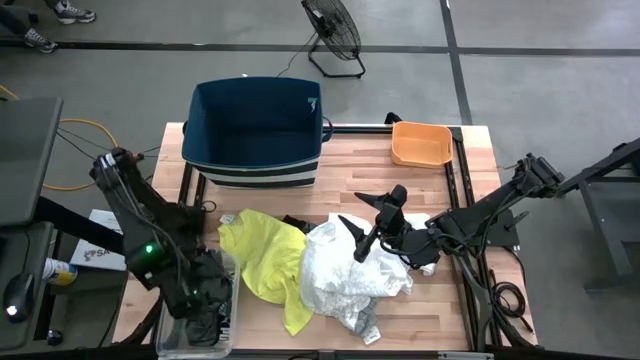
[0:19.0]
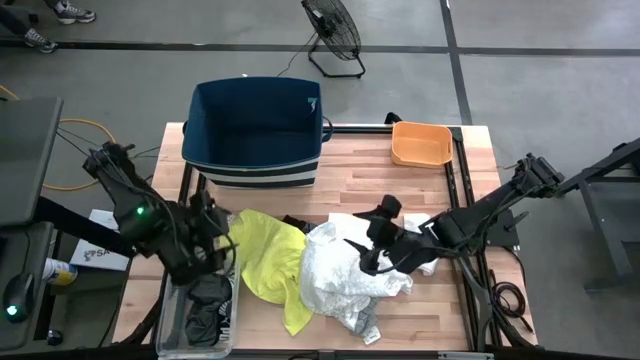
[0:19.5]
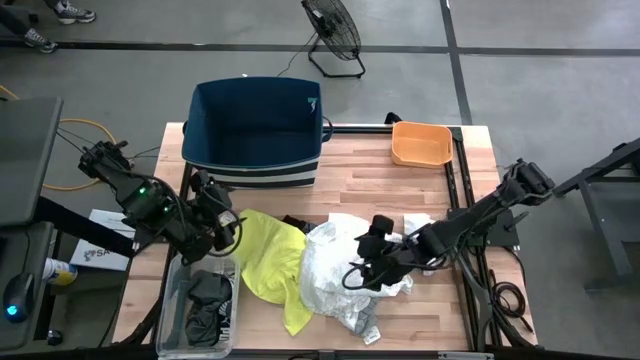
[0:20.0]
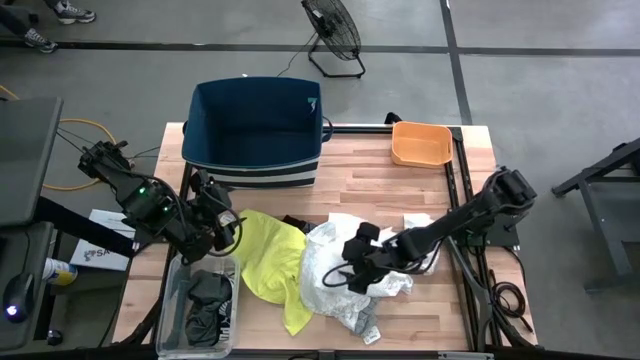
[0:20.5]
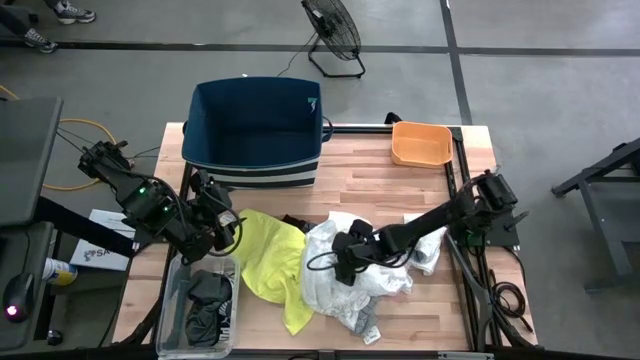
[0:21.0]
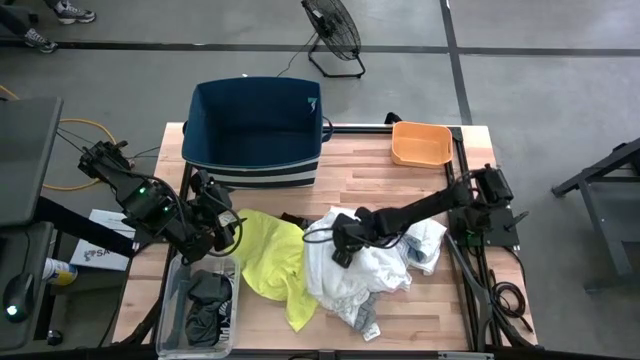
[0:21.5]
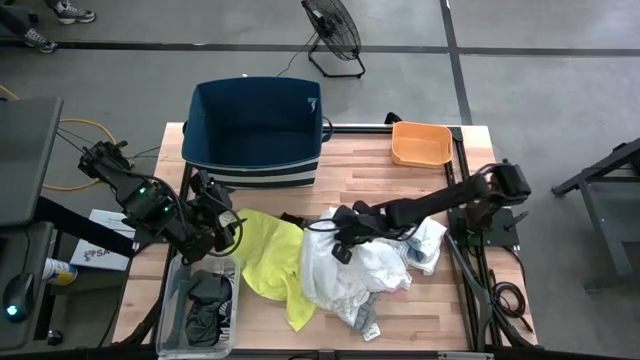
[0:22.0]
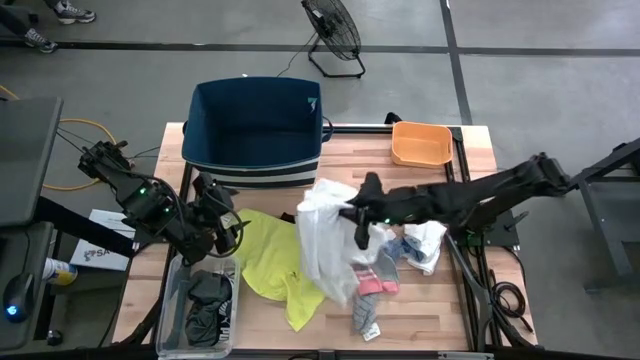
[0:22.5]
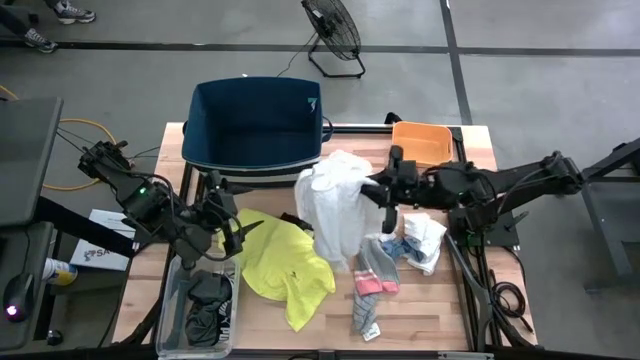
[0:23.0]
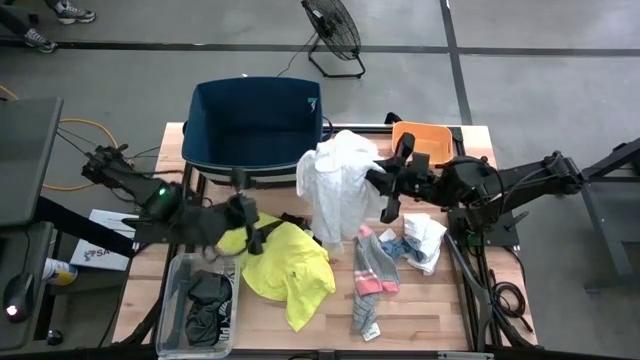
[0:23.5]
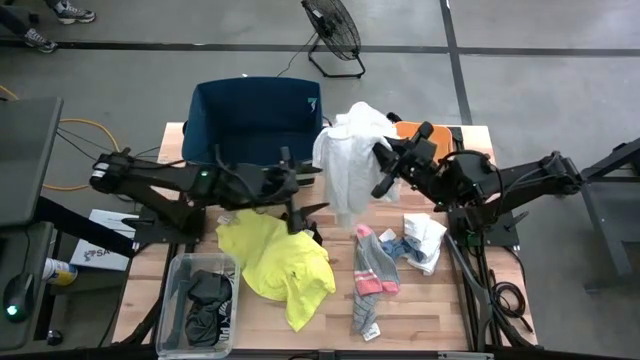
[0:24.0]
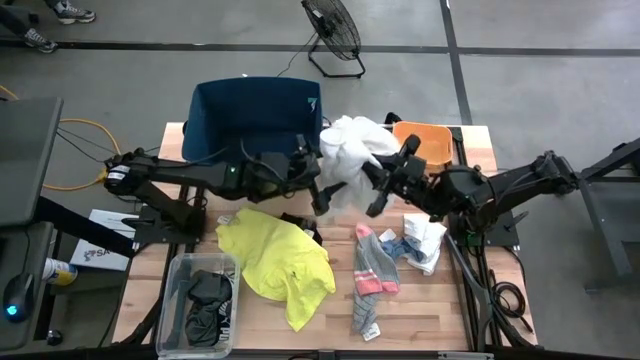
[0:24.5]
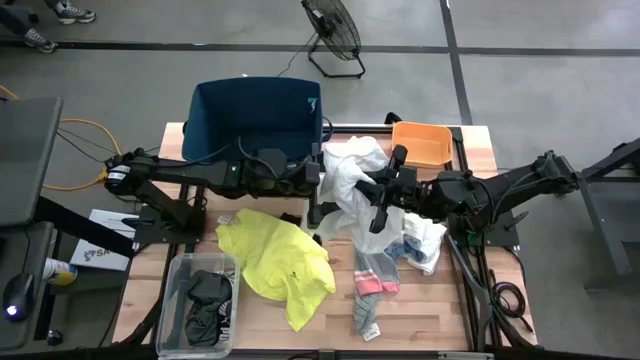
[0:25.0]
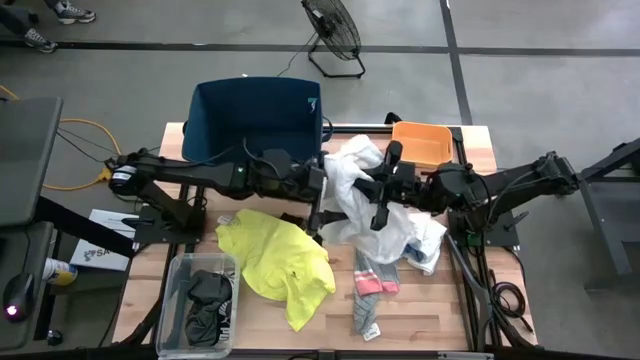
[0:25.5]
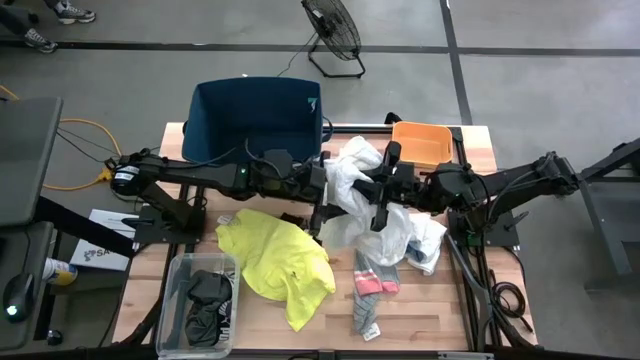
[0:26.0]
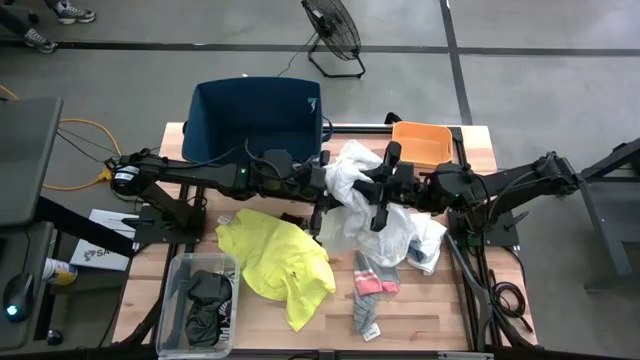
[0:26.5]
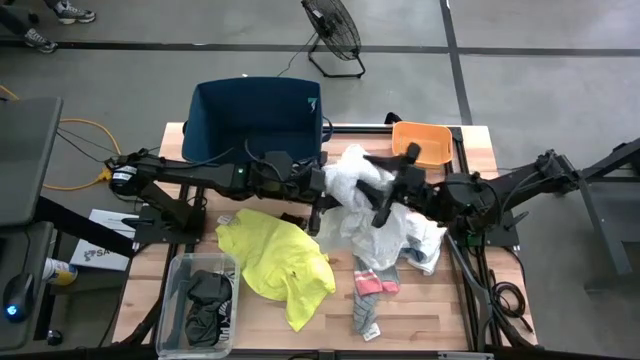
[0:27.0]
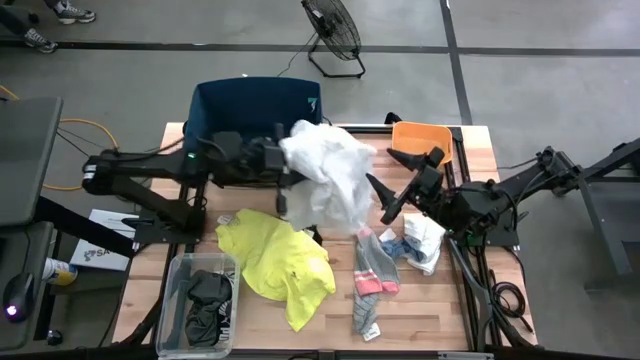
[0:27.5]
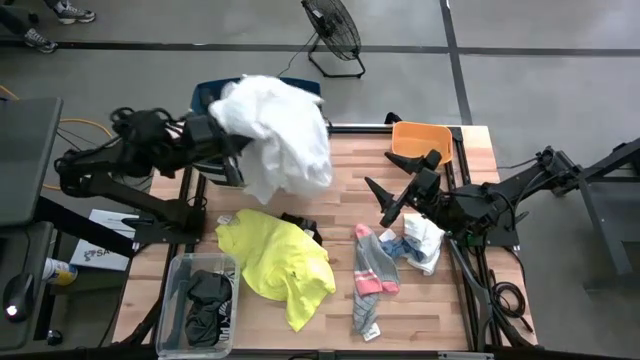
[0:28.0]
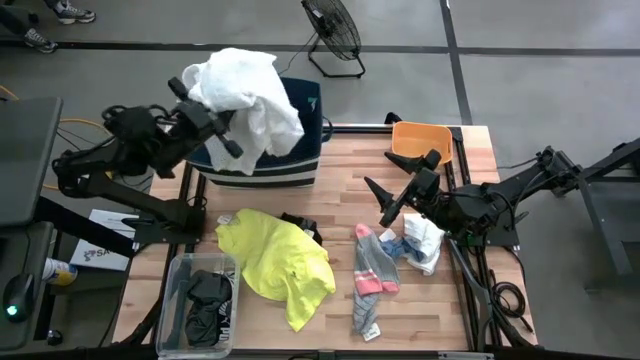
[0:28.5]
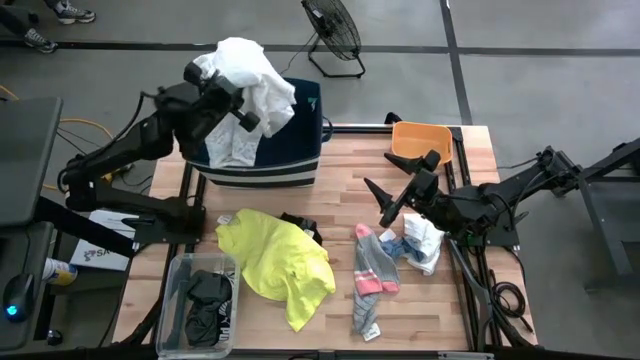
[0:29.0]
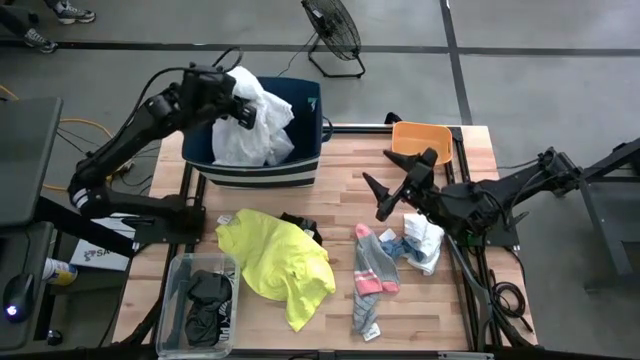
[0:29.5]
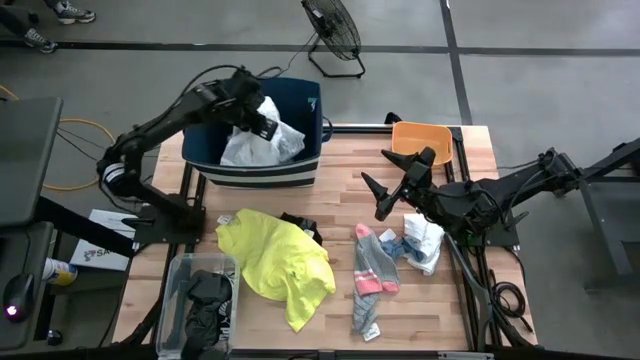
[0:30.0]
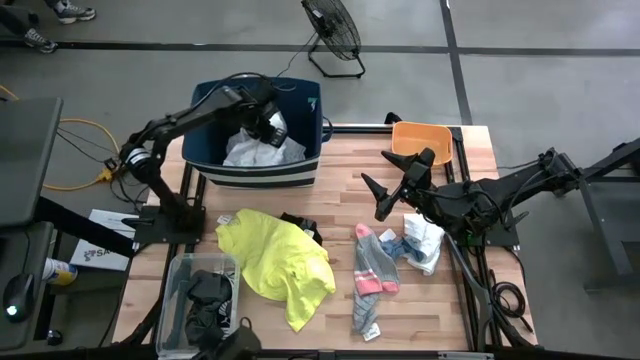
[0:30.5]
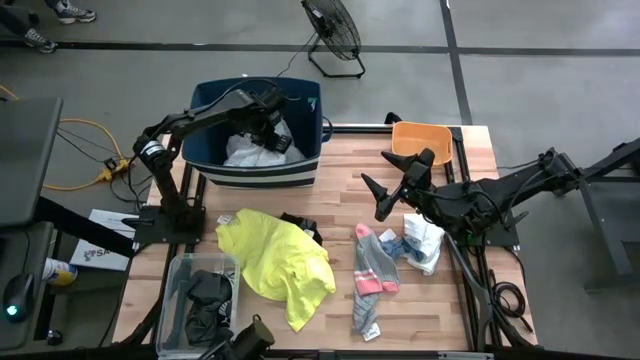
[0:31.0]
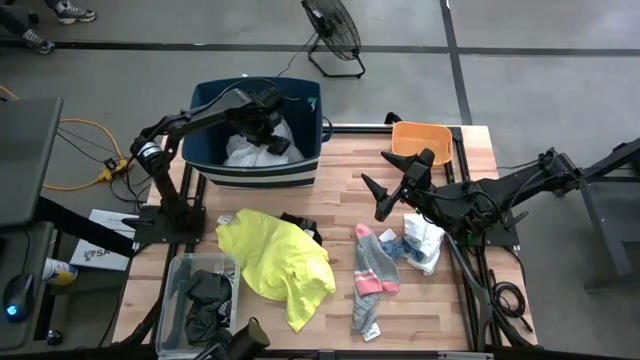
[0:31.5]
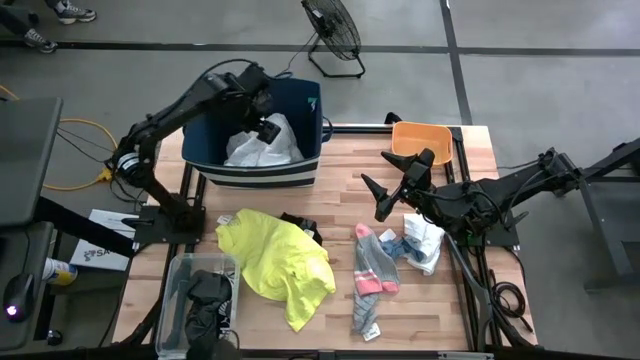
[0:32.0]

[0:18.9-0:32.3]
Task: Pick & Place Cloths
Put the white shirt into the laundry bin

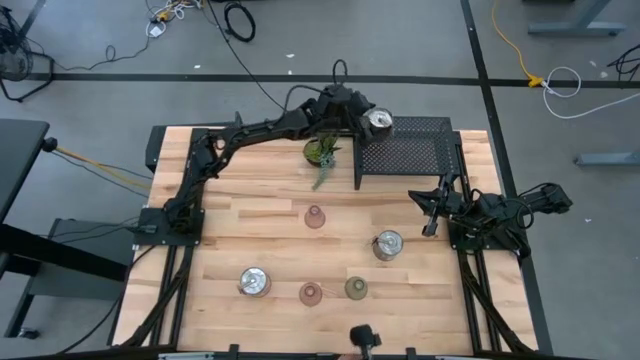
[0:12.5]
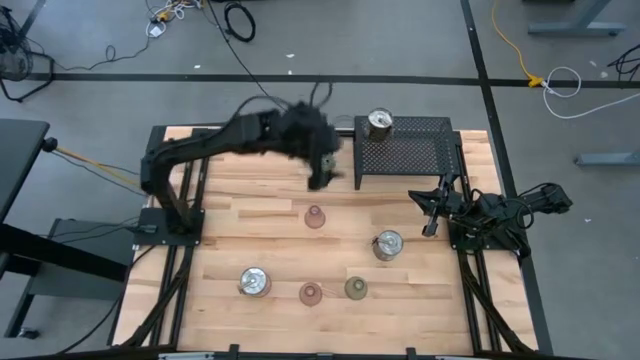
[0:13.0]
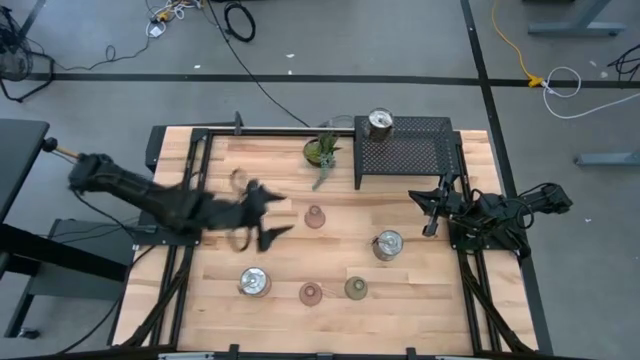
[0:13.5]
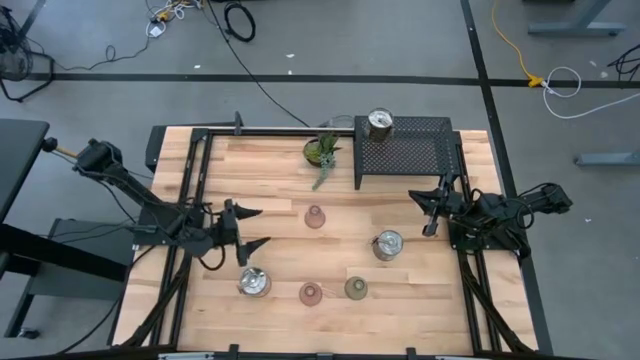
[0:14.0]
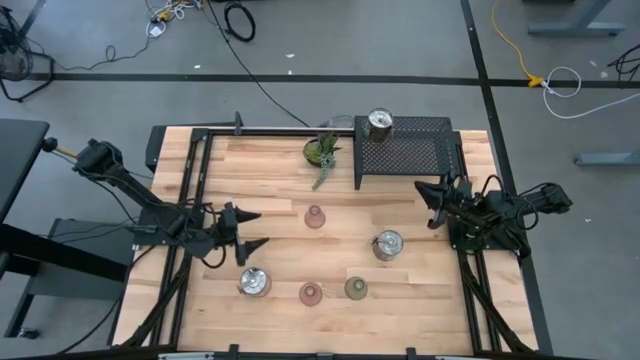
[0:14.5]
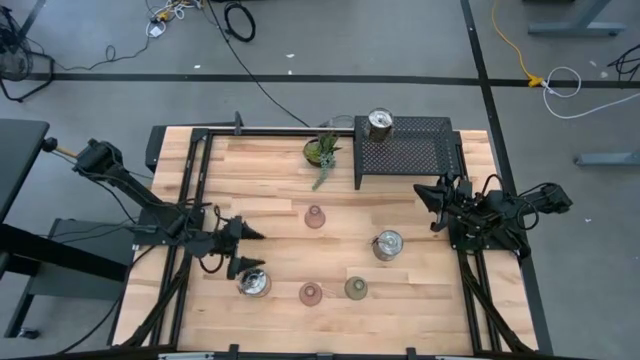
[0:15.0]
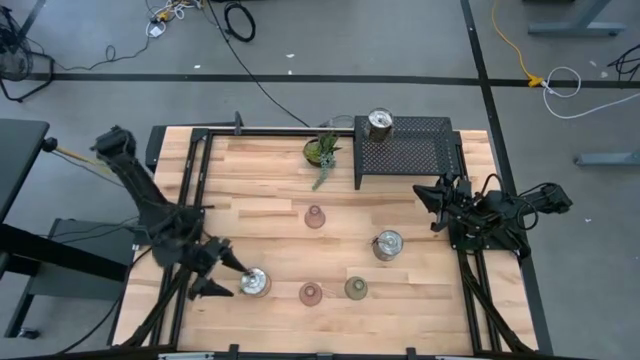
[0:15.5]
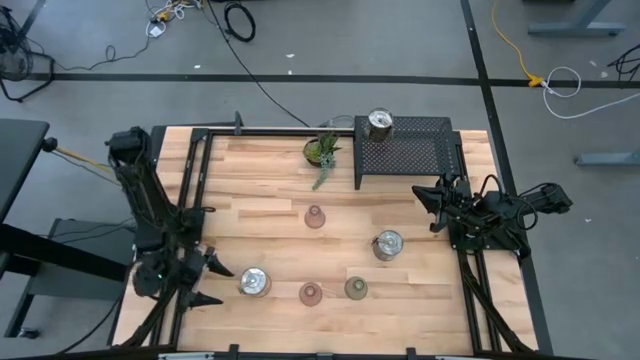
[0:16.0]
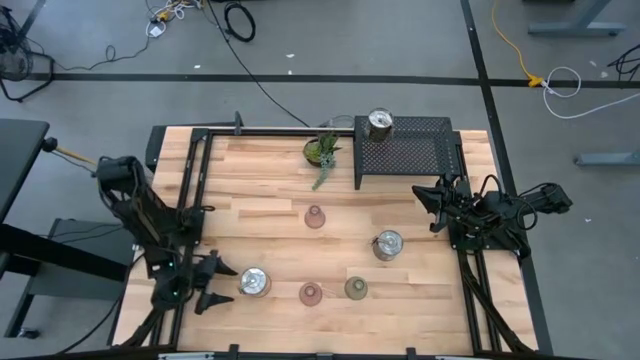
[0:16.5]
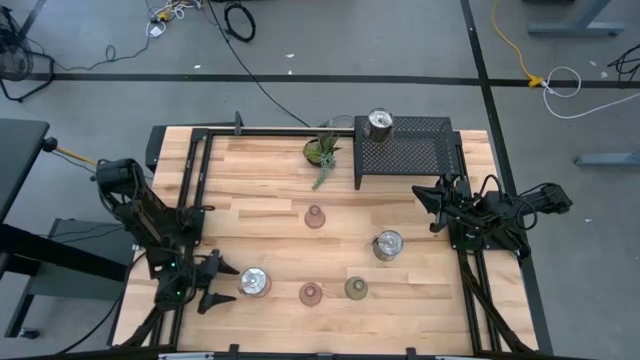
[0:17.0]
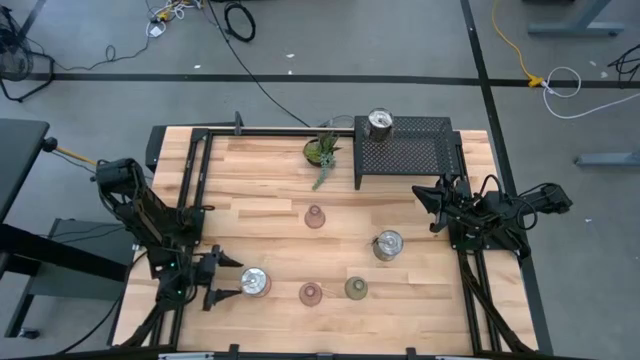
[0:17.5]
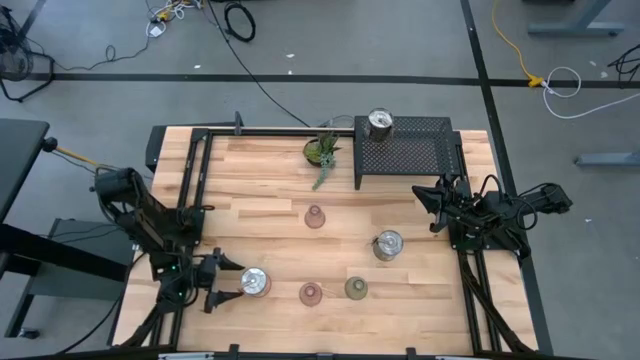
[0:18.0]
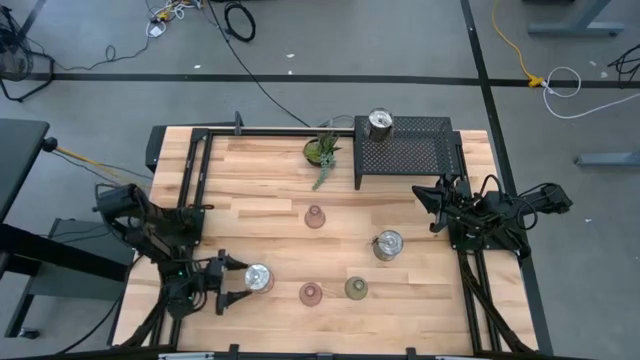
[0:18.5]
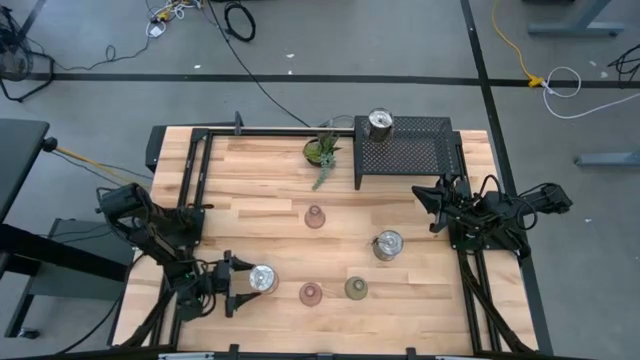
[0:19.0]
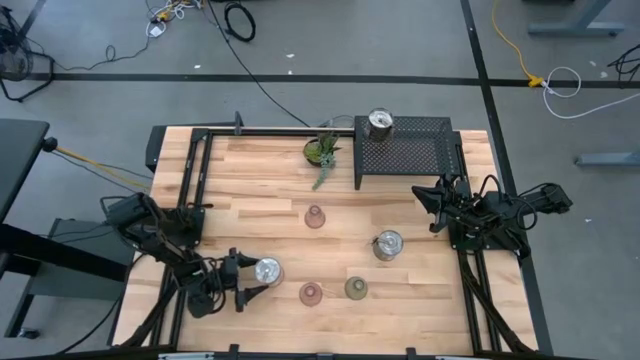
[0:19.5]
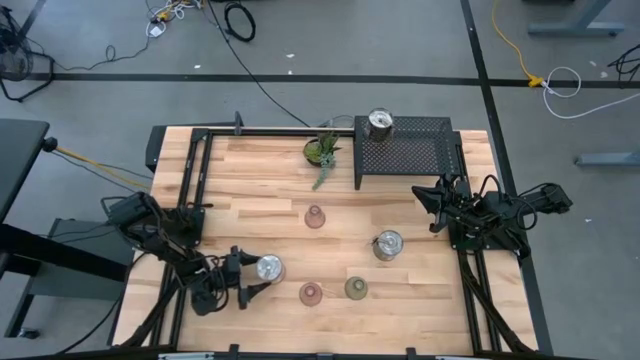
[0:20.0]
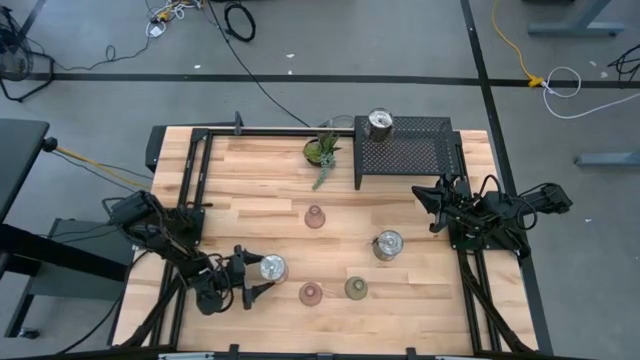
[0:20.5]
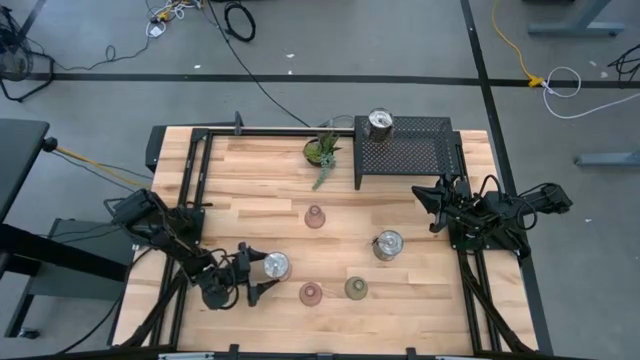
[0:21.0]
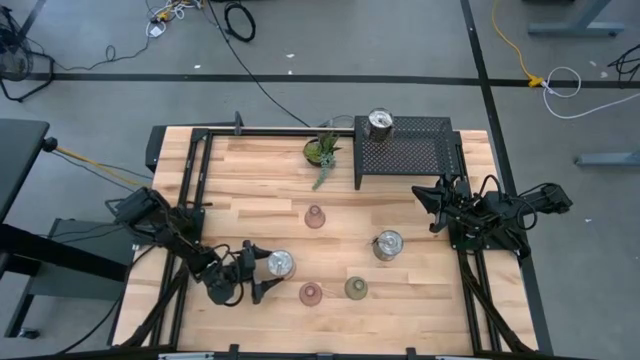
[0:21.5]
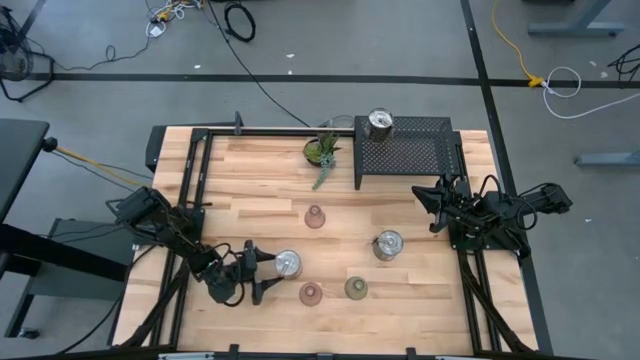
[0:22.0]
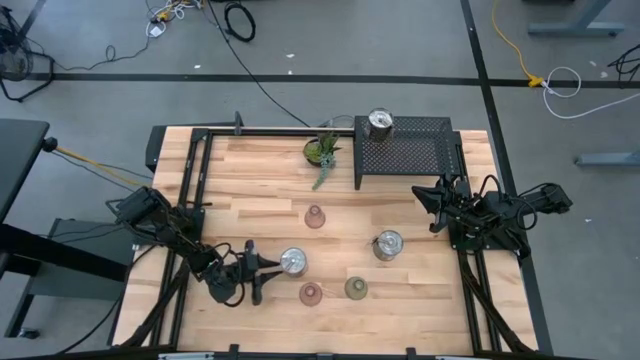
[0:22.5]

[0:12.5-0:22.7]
Task: Pick & Place candle stick holders
Align the left silver scented candle with the silver scented candle on the shelf
